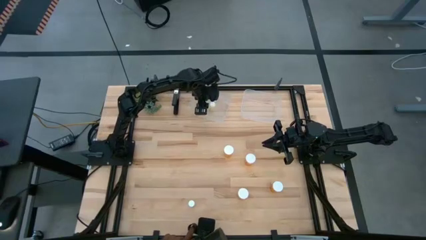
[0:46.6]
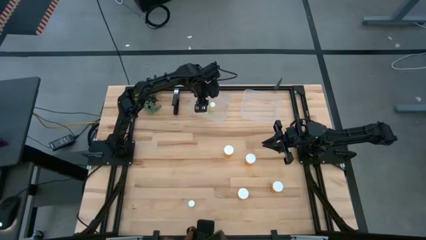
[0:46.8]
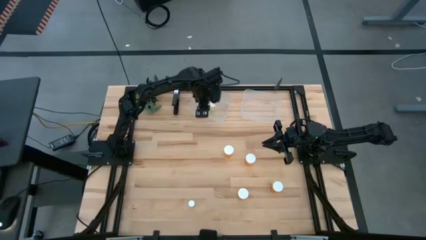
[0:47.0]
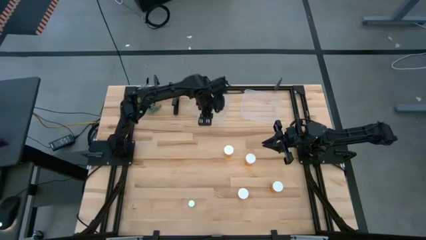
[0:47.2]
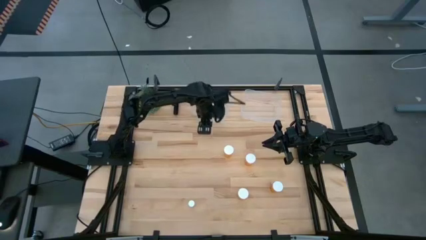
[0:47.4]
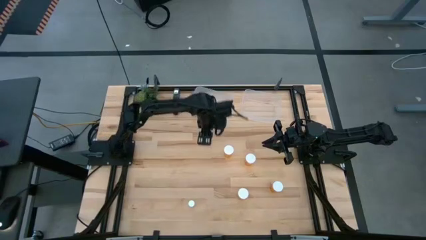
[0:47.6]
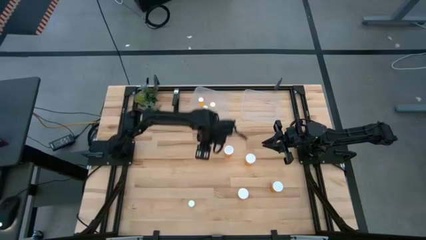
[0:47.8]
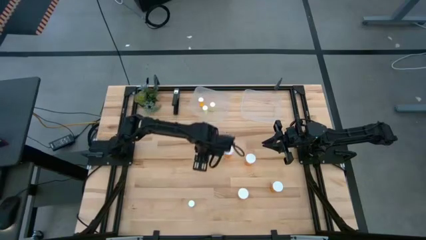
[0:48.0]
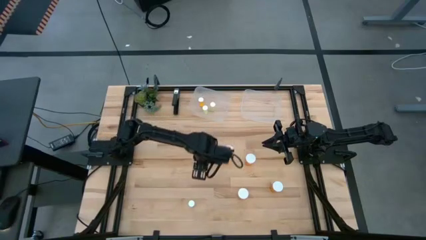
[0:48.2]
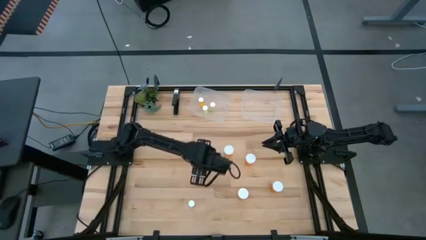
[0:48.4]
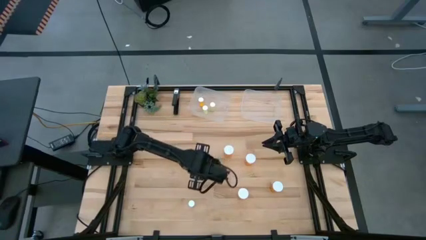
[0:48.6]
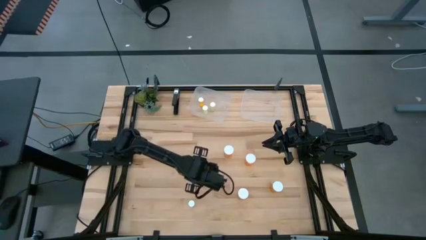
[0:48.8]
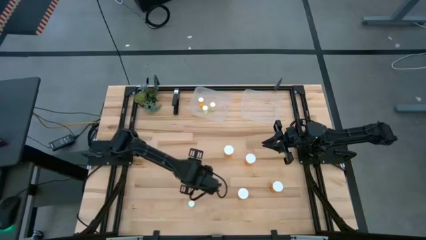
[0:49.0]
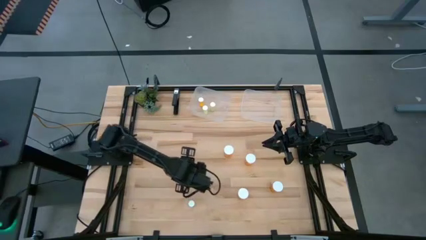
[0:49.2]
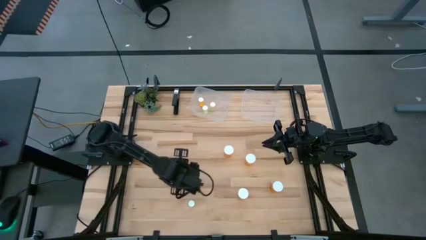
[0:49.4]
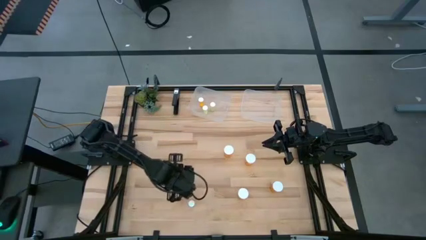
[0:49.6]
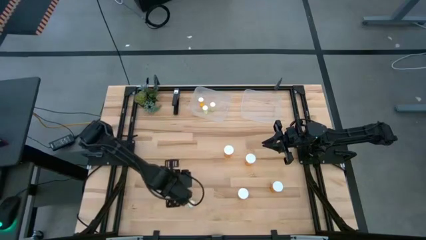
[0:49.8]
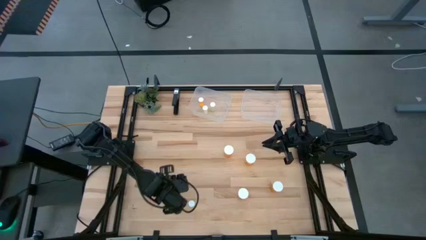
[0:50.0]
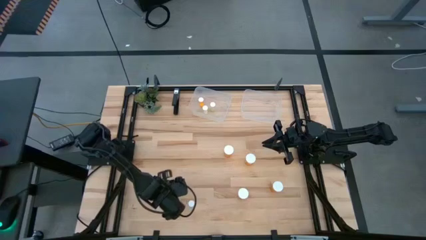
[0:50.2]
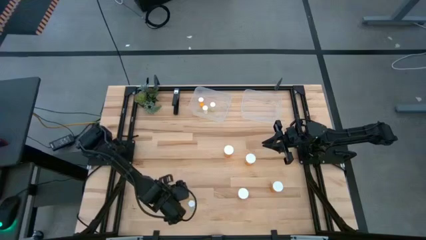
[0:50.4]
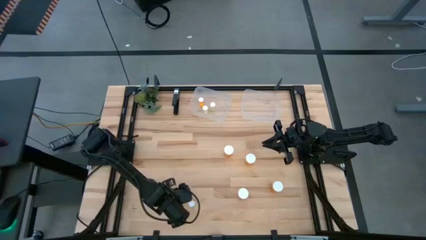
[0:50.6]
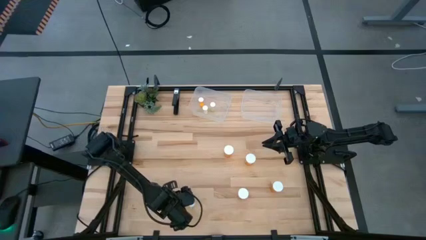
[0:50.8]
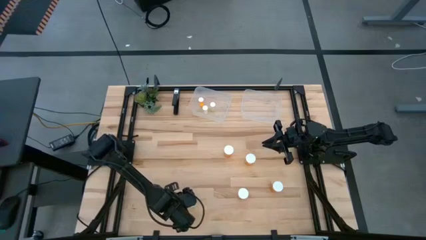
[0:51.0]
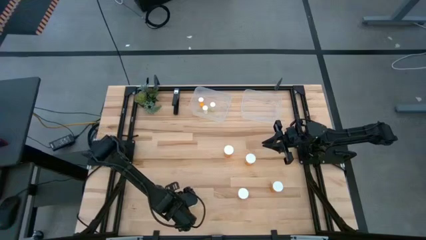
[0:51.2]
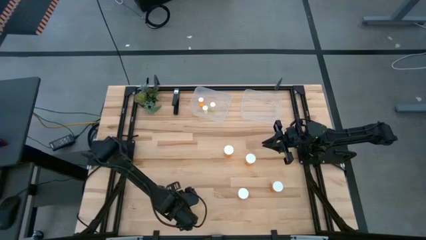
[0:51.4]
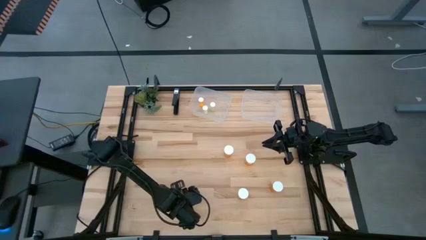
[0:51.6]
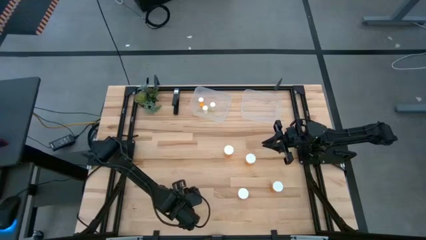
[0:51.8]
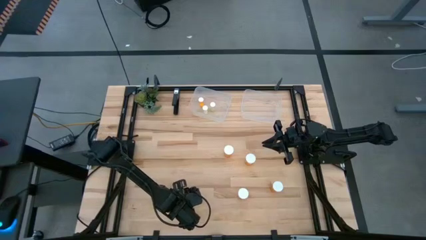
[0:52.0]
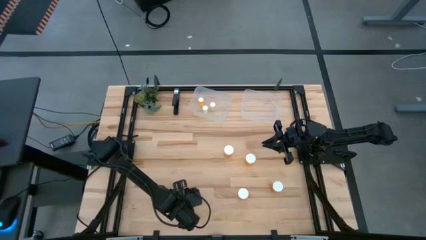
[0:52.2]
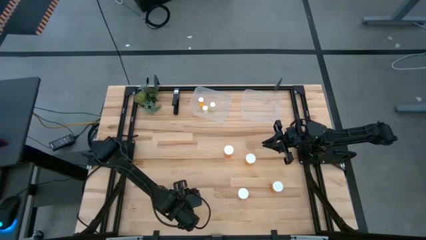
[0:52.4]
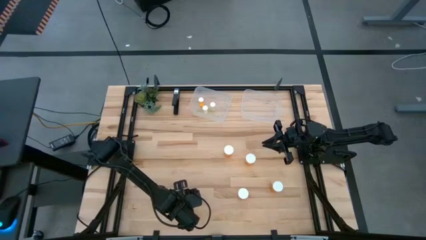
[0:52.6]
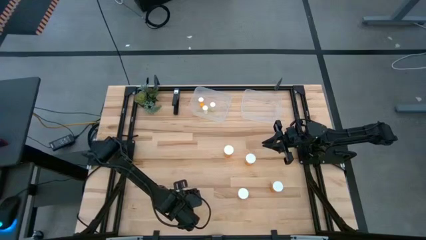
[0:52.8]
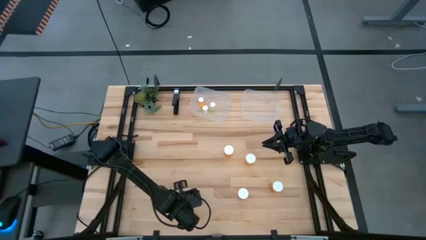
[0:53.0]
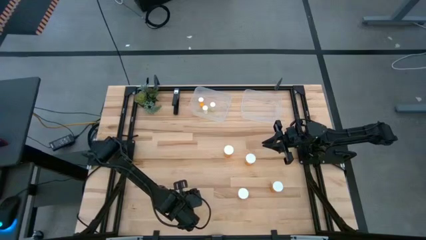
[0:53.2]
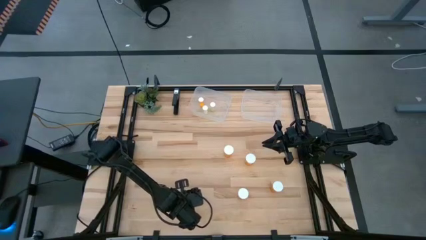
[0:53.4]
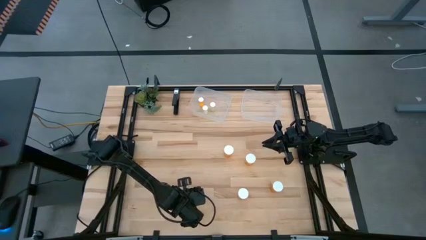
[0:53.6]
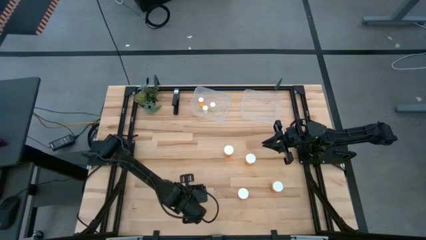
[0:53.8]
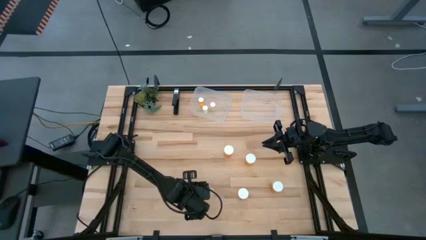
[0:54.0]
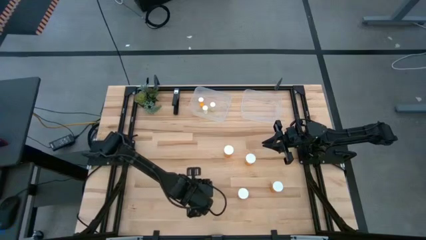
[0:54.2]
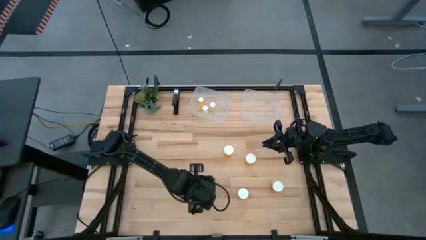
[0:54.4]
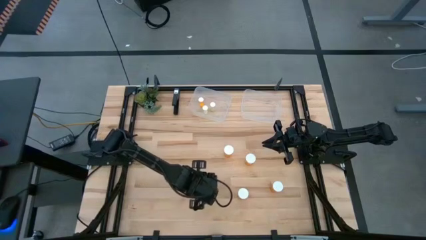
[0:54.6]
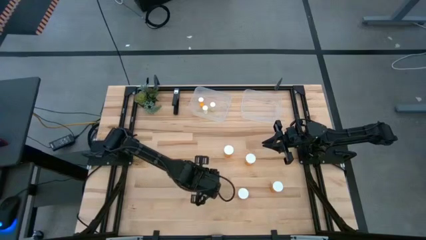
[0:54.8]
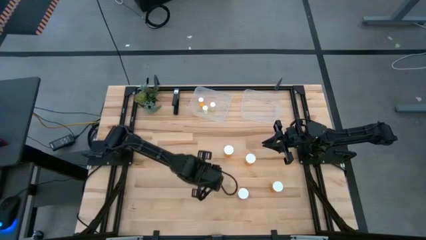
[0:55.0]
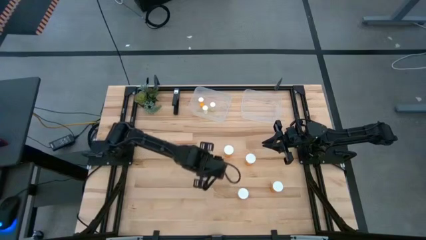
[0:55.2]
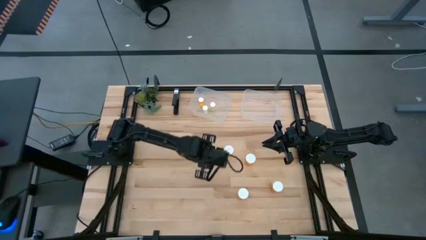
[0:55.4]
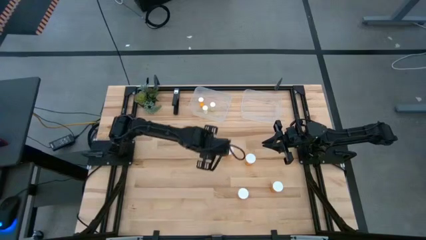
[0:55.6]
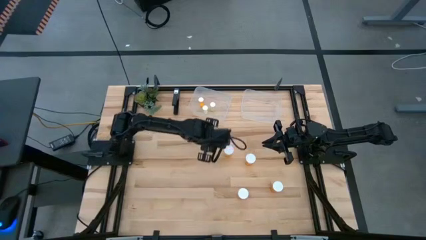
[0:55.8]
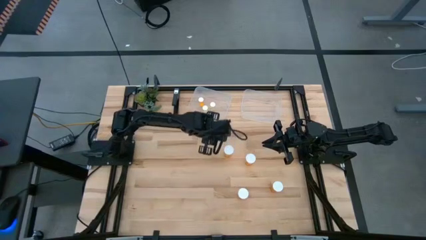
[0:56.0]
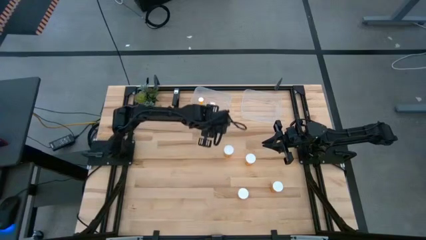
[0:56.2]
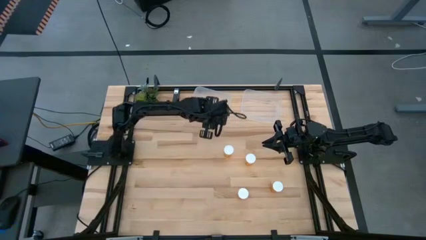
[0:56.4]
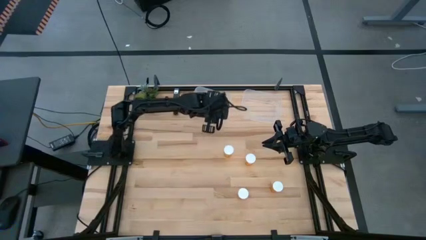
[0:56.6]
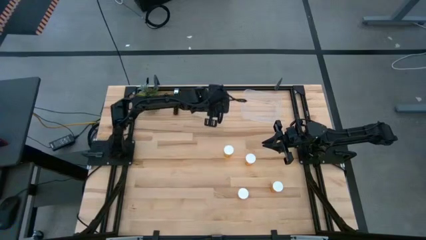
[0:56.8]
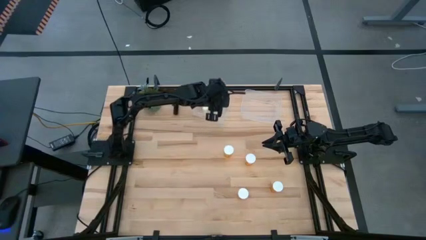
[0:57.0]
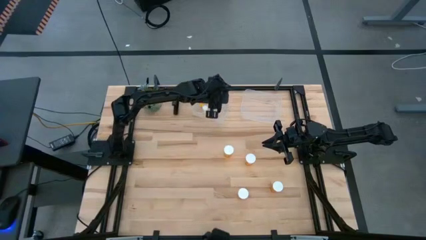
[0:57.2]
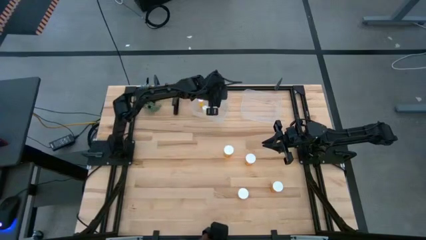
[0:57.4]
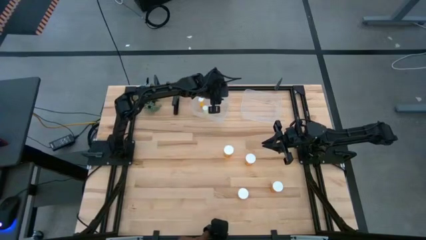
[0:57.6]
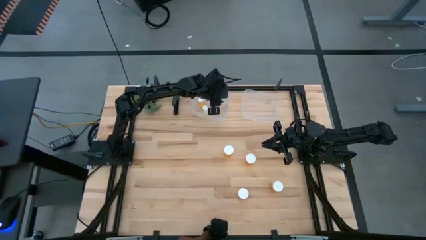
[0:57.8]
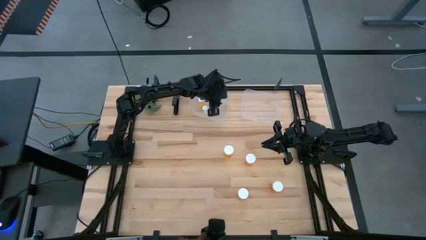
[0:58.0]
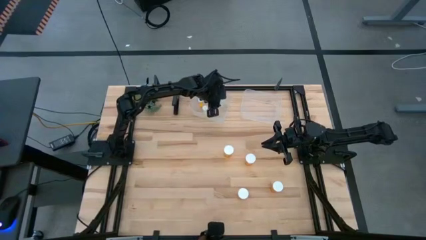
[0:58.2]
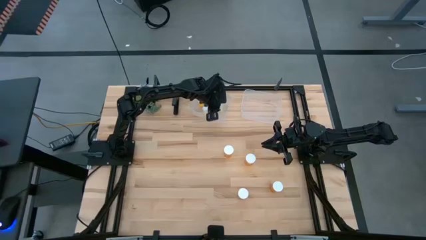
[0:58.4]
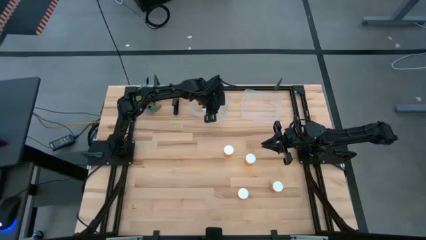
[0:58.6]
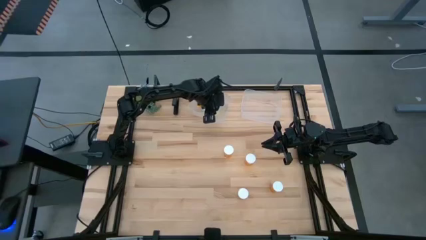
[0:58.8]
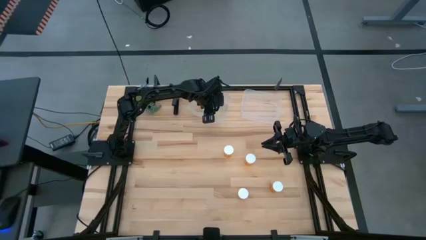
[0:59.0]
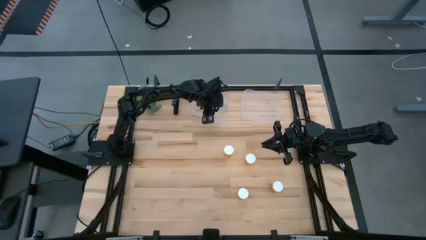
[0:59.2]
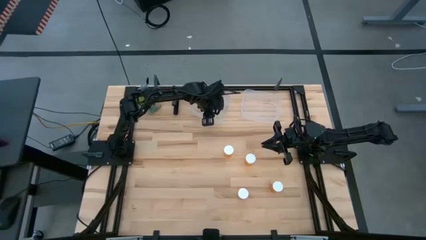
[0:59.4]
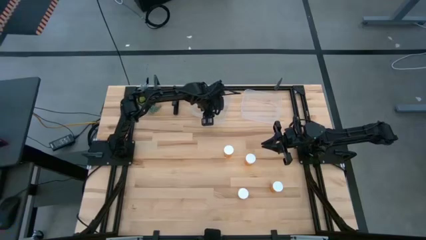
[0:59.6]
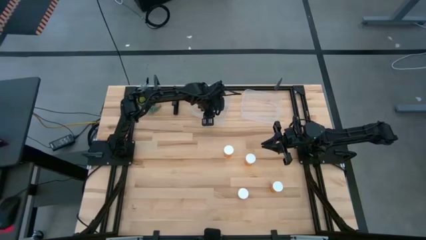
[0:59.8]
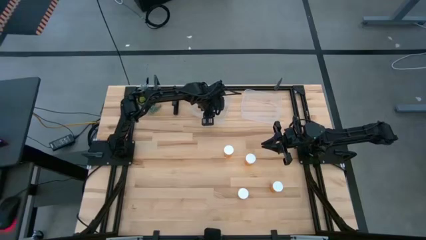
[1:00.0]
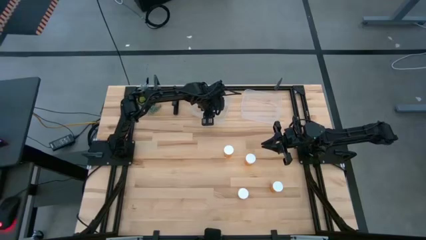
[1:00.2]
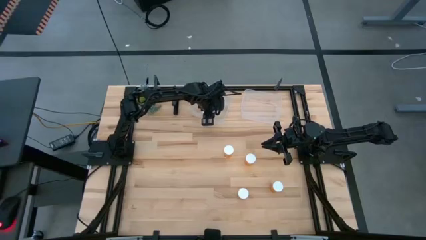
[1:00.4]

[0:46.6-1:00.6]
Task: Pick and place medicine bottles into bin by pill shape (circle, oval)
Put the small yellow pill bottle into the left transparent bin
